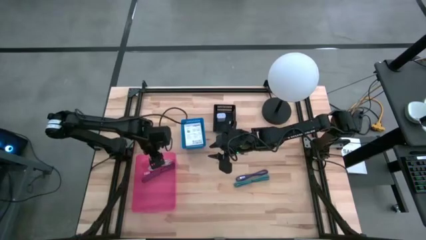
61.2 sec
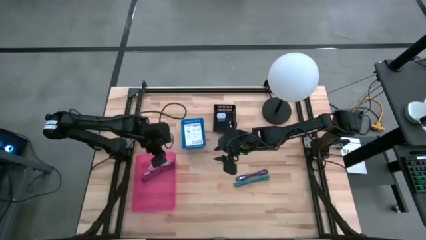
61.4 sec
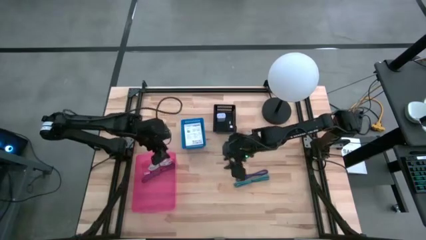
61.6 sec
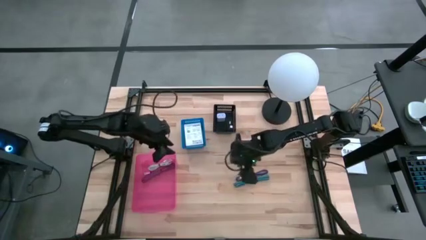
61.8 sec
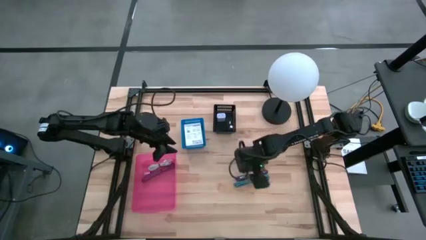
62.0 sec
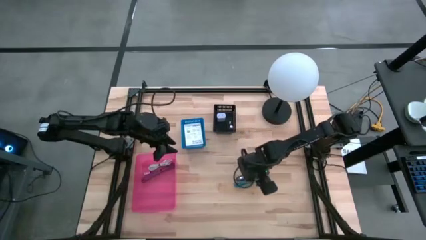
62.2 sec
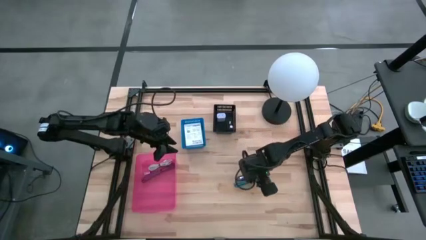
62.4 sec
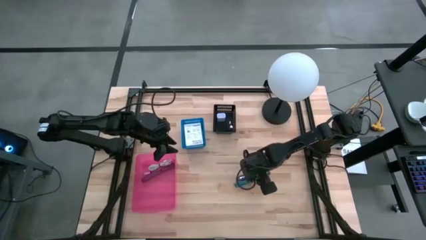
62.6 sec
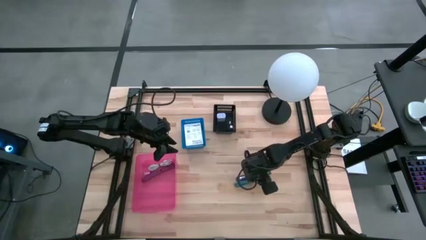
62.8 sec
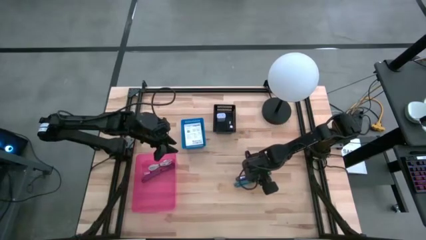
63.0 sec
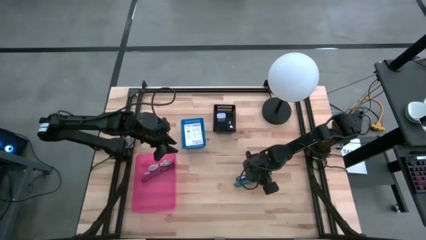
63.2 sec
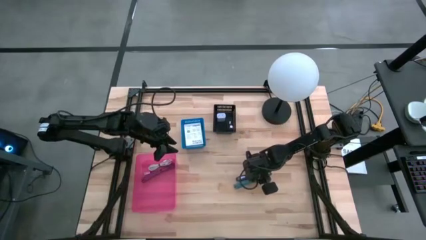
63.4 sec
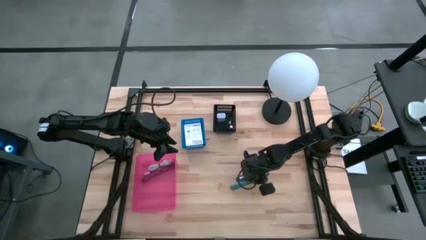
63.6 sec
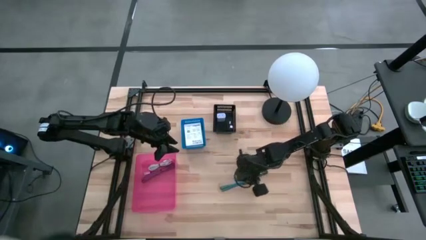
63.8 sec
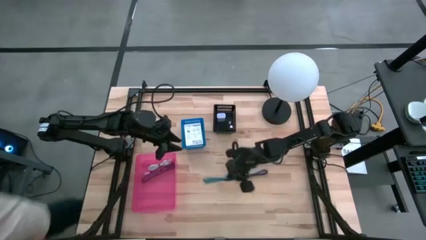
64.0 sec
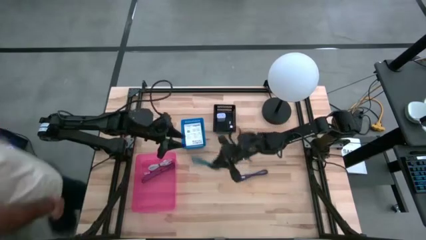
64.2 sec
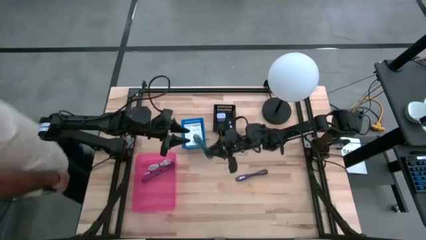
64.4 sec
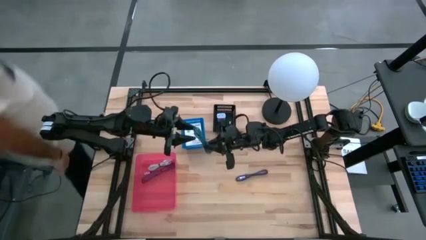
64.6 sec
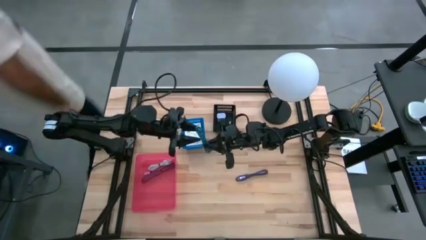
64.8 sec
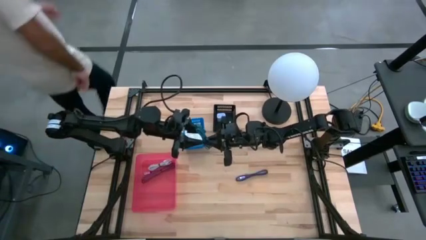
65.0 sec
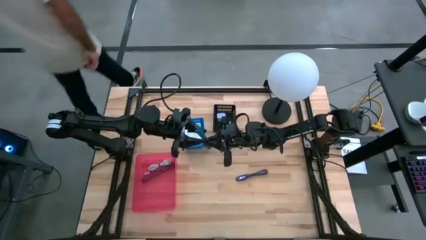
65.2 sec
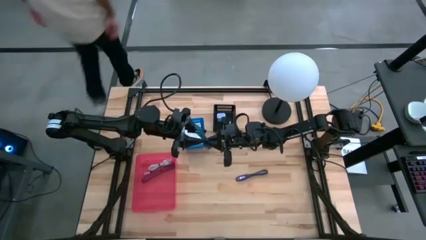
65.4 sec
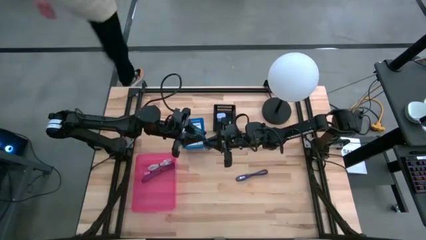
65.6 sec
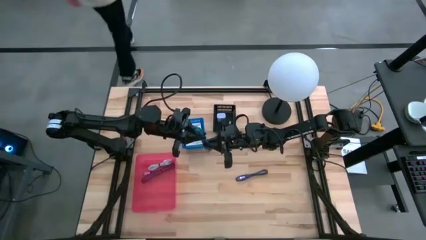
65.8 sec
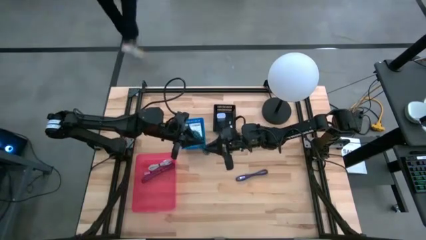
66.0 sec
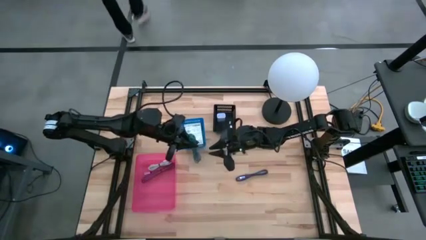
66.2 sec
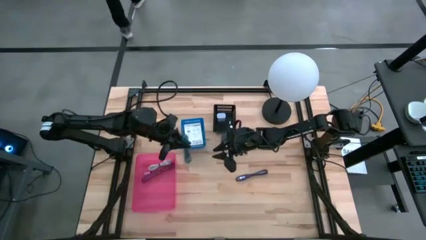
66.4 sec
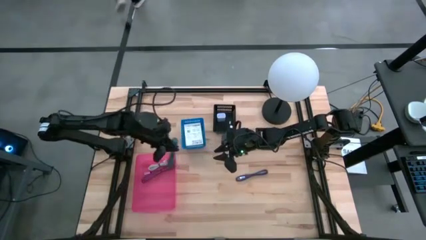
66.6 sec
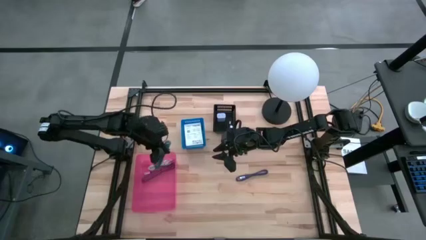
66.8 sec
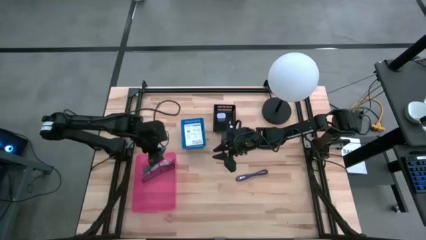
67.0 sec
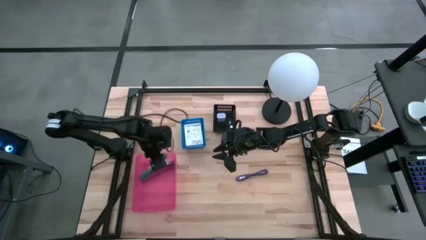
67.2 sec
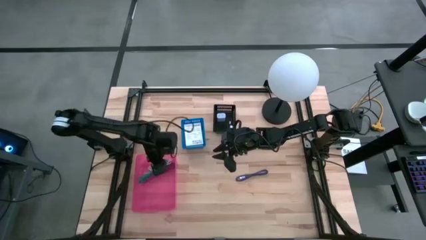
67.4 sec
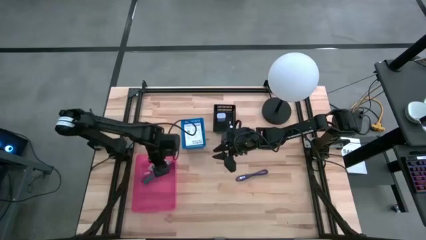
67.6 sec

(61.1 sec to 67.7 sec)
Task: Pick and place items into bin
Put the light blue charger cable into the pink bin

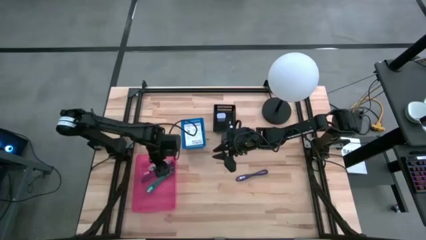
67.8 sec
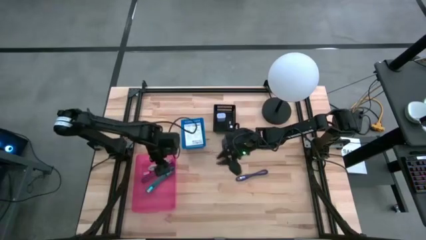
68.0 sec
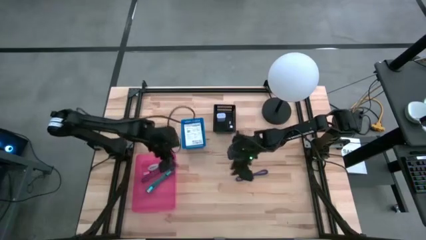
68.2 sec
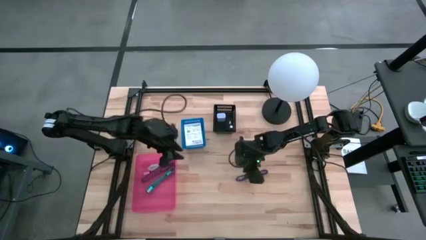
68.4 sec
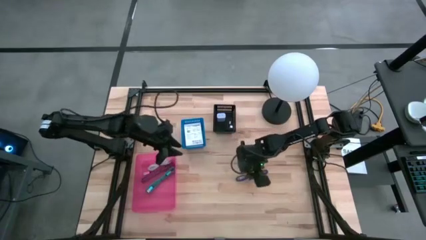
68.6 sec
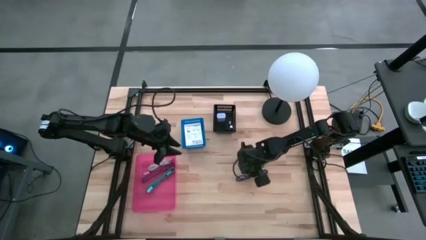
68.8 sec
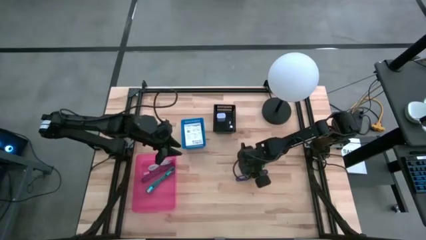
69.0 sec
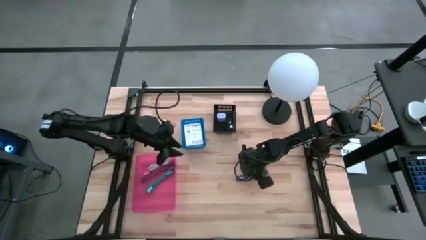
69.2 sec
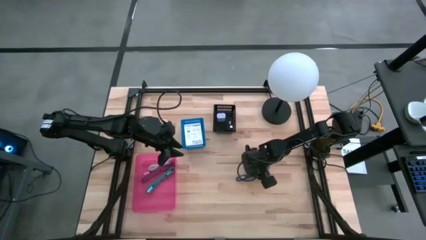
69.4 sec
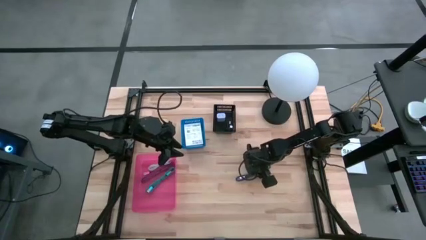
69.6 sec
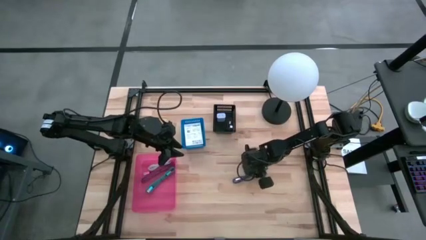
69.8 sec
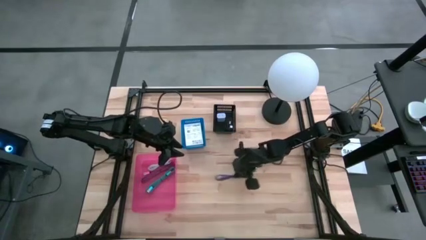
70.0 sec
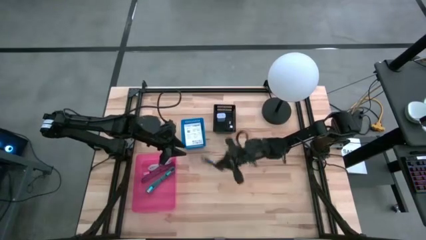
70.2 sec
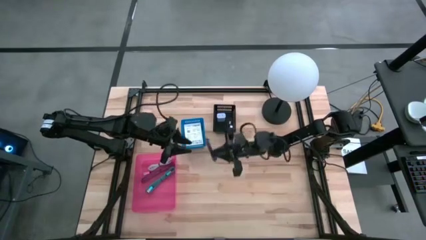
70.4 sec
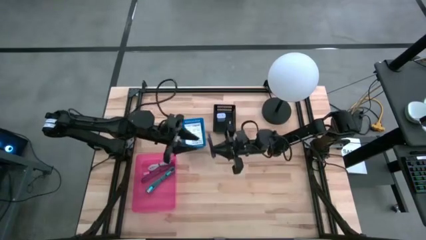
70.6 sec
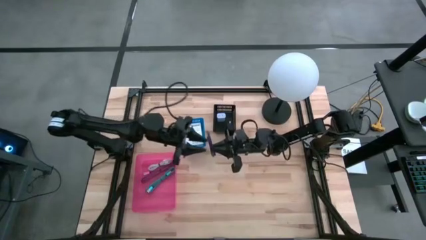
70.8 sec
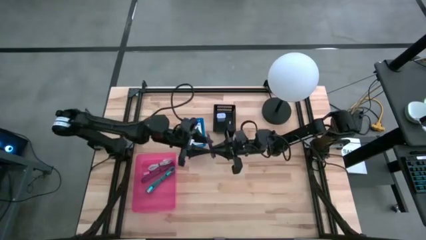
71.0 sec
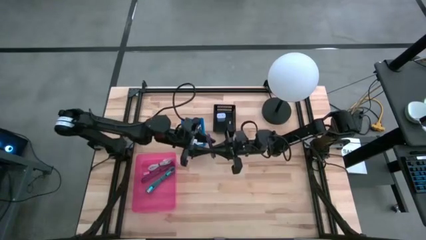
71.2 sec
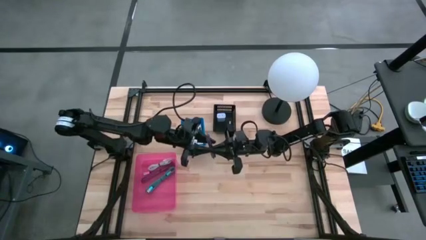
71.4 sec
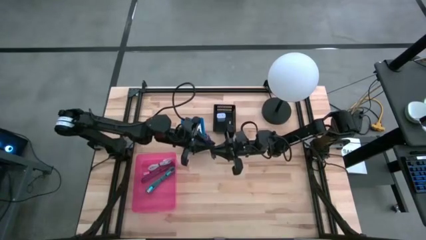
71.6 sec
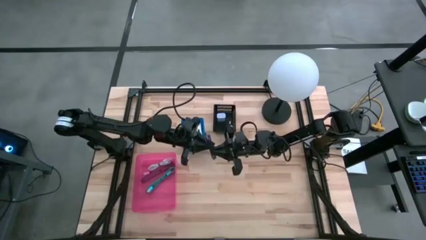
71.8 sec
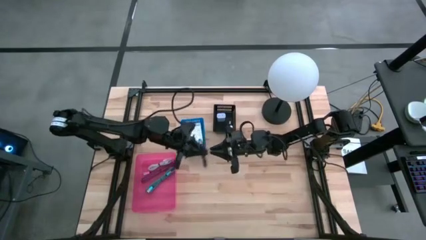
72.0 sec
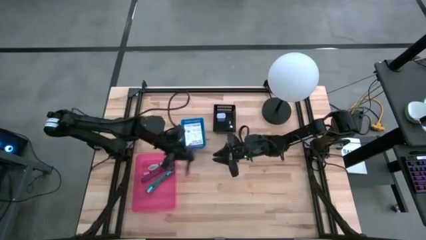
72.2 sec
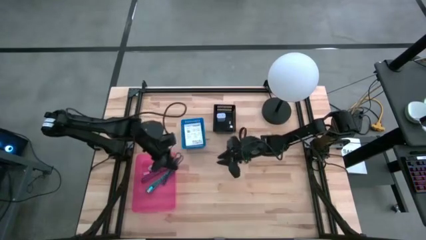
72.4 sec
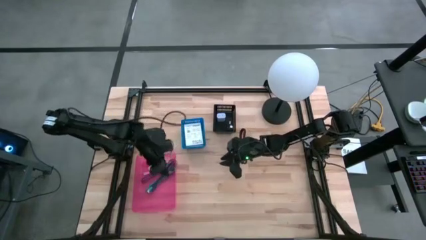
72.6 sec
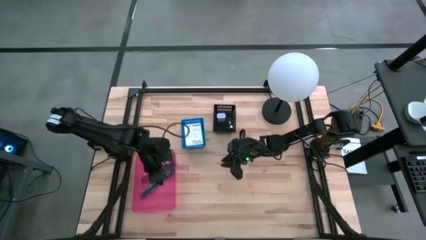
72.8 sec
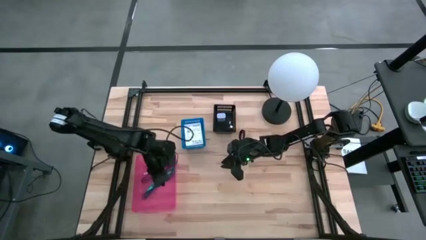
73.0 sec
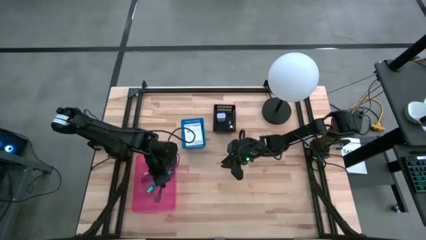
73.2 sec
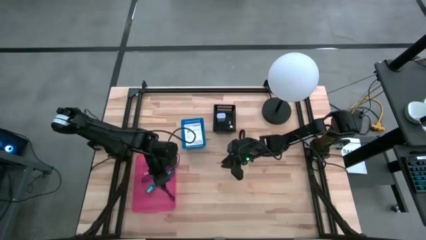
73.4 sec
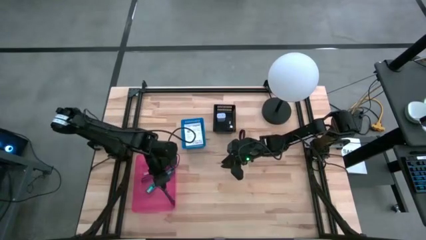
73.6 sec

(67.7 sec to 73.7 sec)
Put the blue charger cable into the red bin
